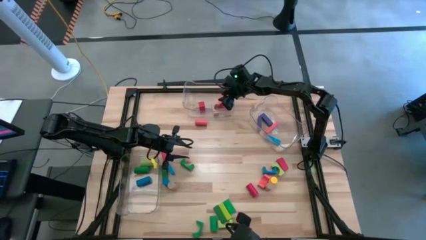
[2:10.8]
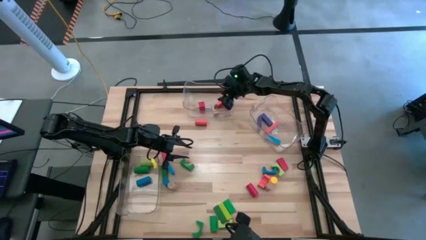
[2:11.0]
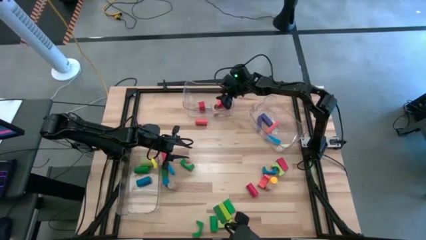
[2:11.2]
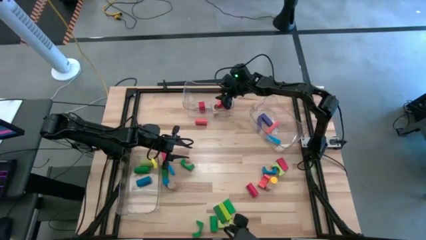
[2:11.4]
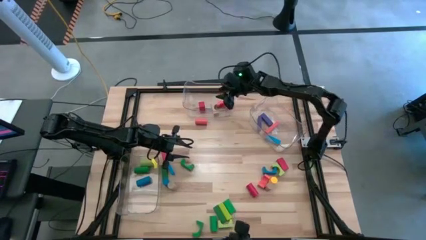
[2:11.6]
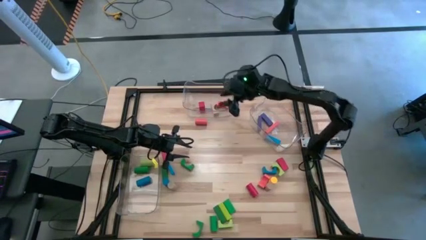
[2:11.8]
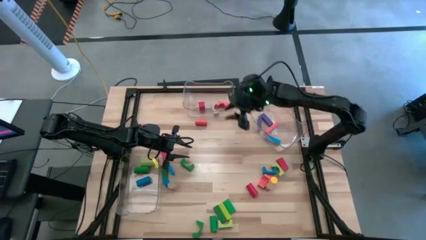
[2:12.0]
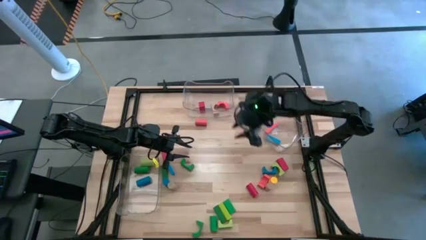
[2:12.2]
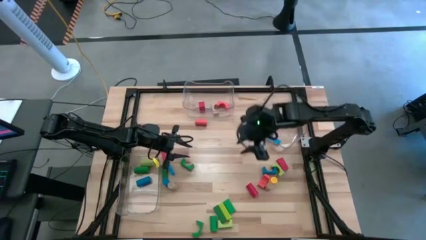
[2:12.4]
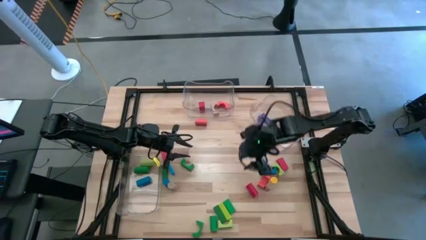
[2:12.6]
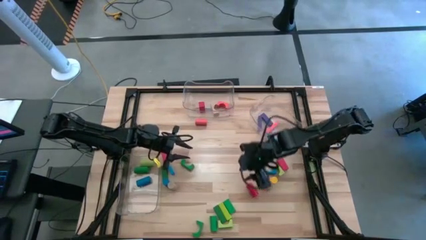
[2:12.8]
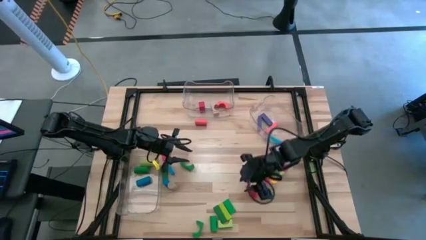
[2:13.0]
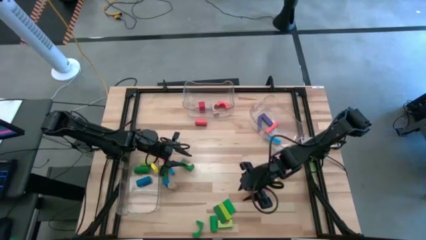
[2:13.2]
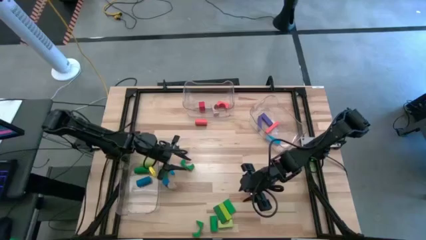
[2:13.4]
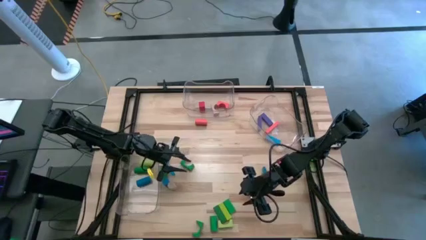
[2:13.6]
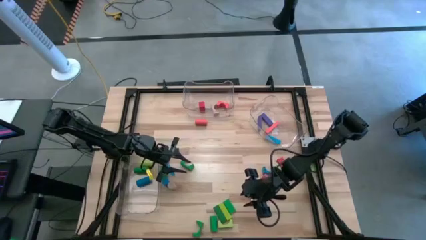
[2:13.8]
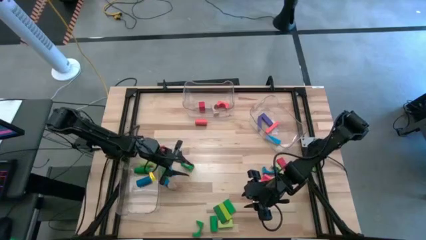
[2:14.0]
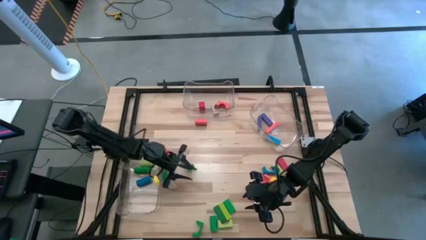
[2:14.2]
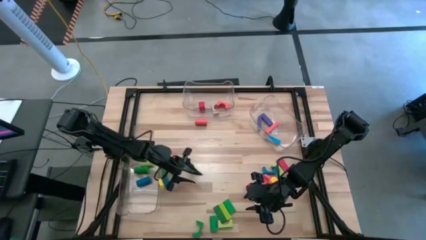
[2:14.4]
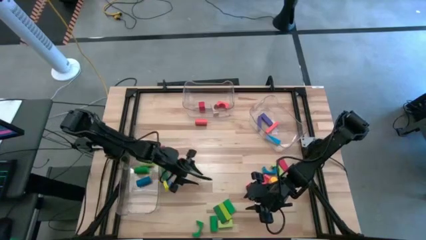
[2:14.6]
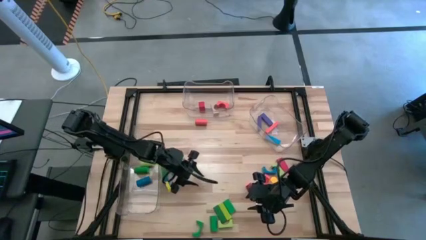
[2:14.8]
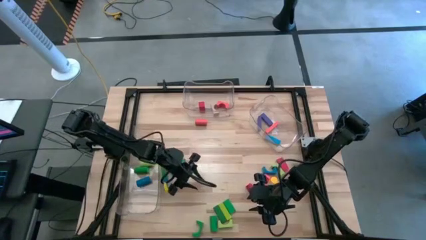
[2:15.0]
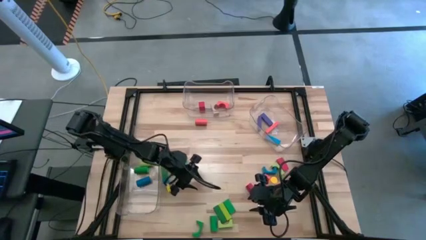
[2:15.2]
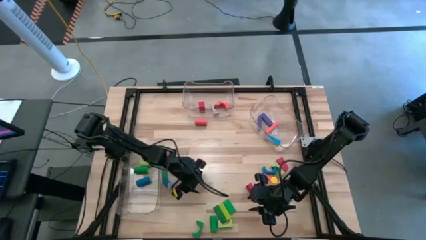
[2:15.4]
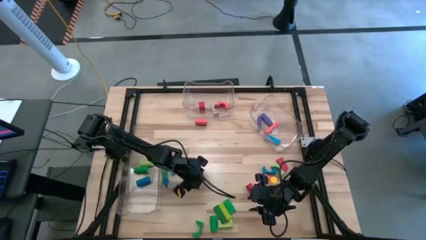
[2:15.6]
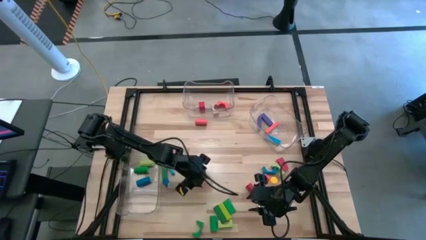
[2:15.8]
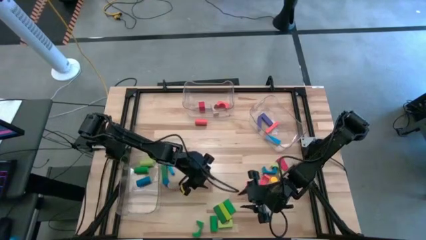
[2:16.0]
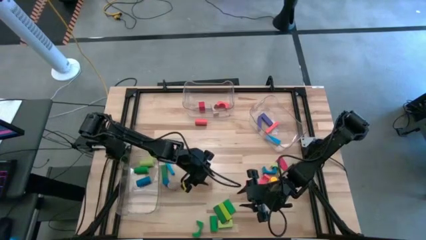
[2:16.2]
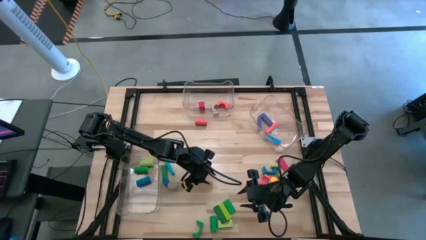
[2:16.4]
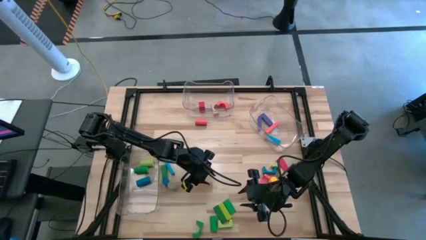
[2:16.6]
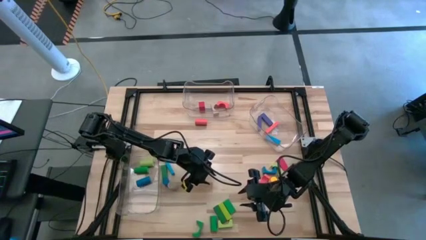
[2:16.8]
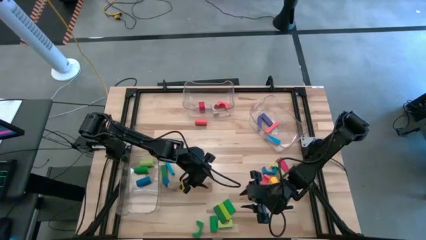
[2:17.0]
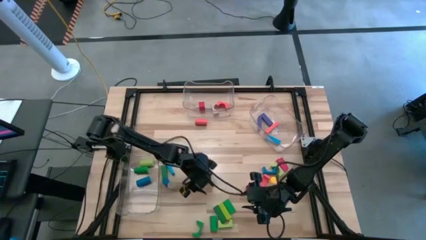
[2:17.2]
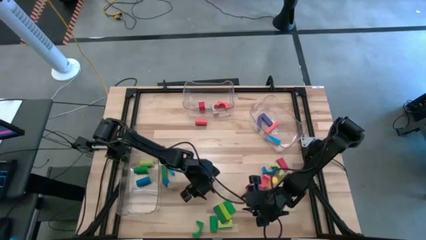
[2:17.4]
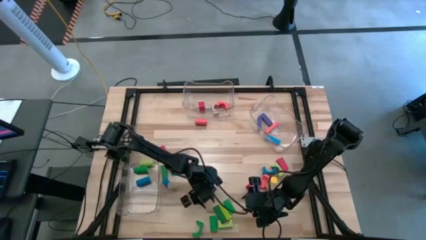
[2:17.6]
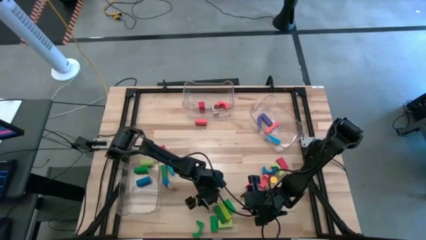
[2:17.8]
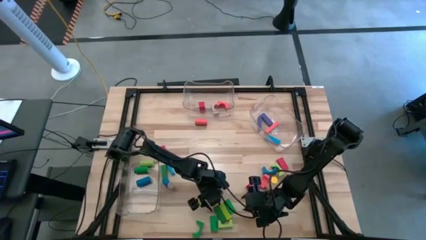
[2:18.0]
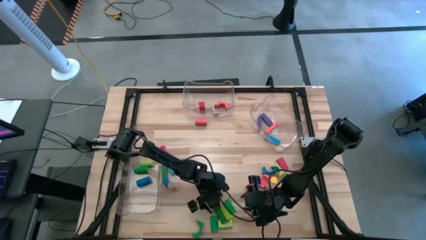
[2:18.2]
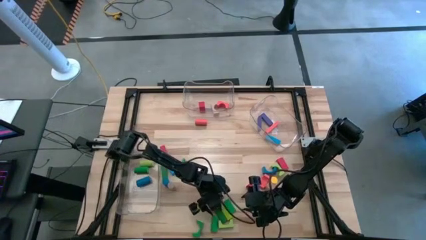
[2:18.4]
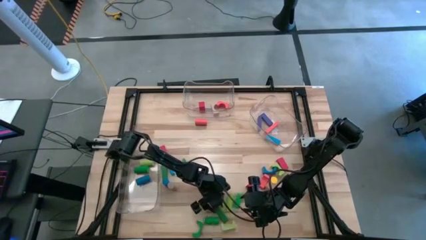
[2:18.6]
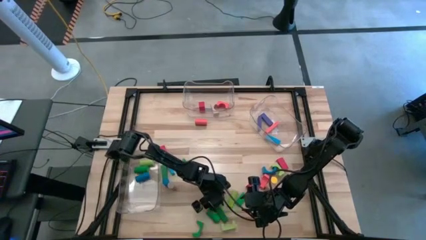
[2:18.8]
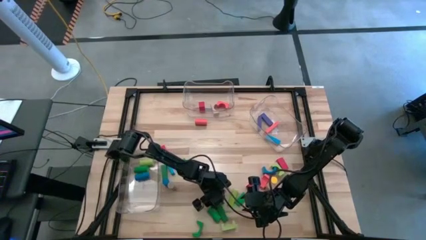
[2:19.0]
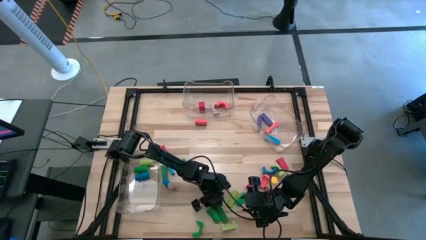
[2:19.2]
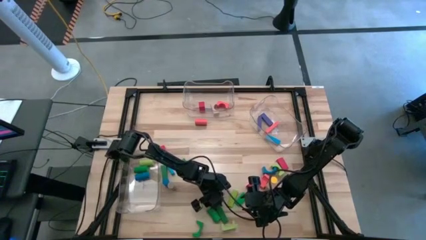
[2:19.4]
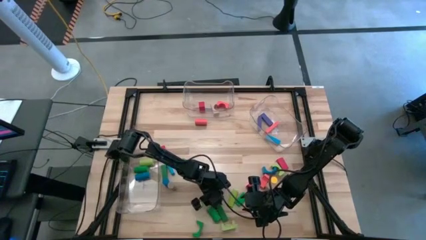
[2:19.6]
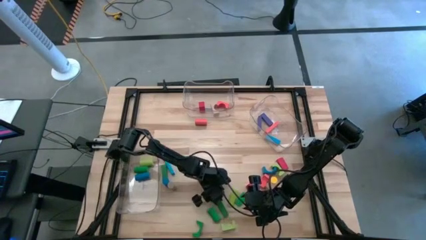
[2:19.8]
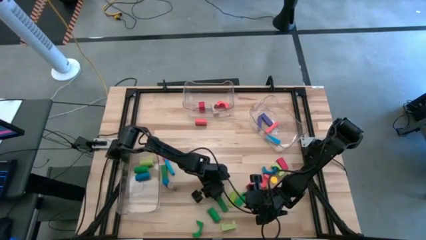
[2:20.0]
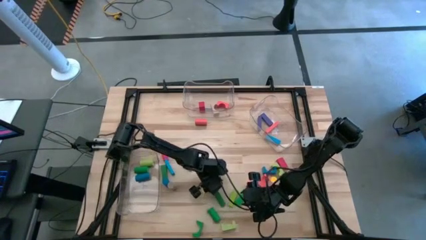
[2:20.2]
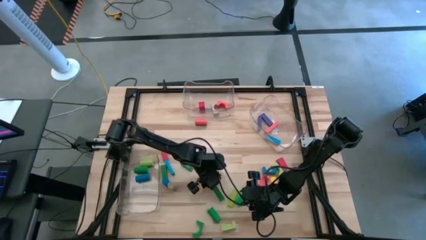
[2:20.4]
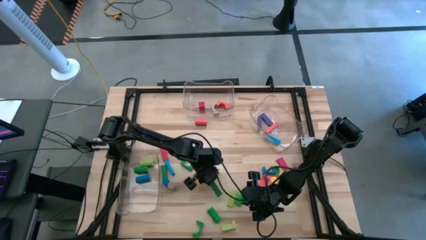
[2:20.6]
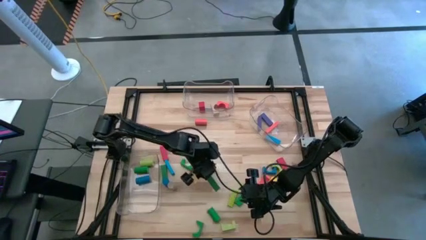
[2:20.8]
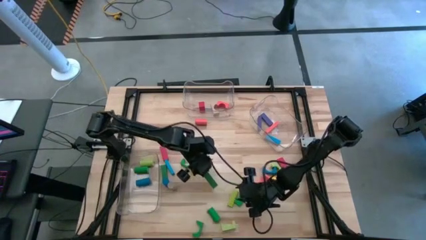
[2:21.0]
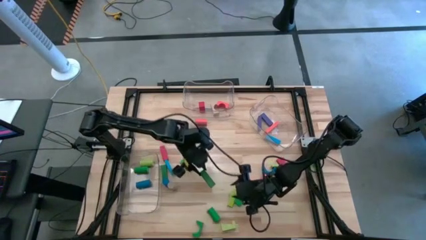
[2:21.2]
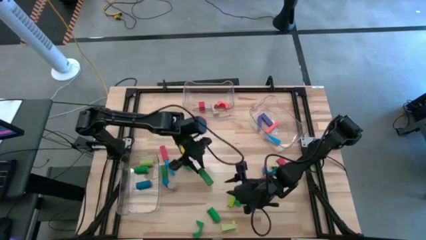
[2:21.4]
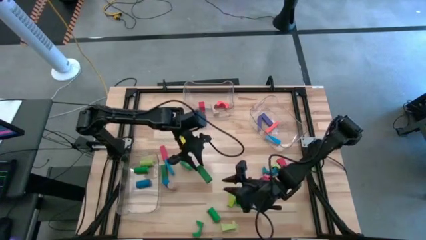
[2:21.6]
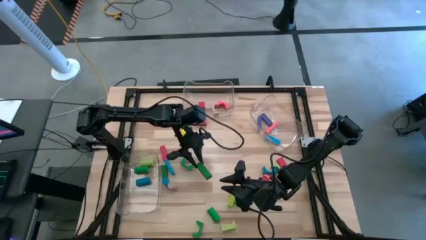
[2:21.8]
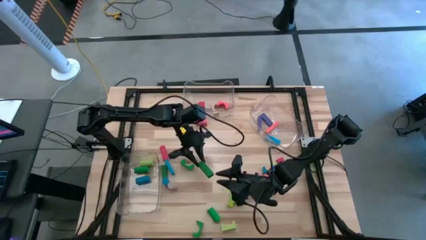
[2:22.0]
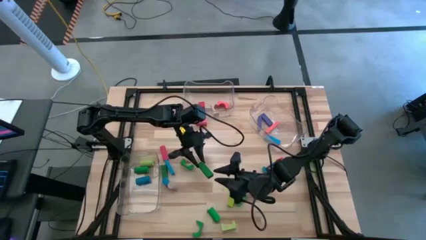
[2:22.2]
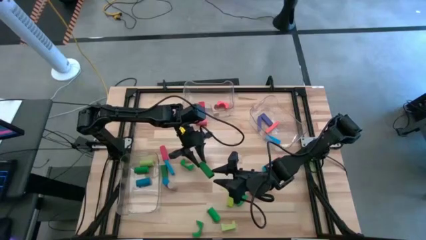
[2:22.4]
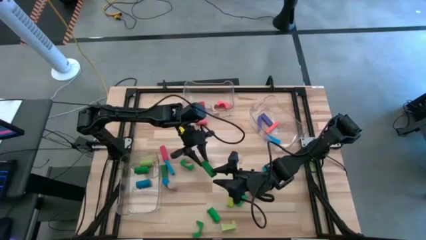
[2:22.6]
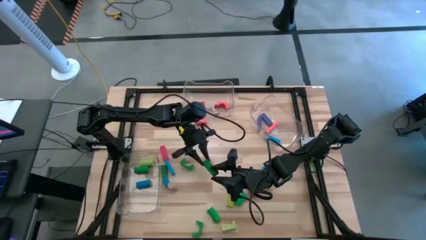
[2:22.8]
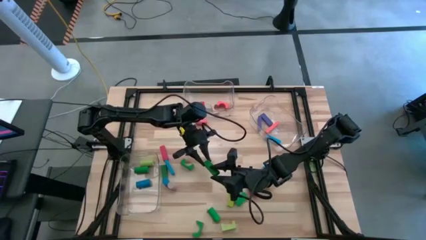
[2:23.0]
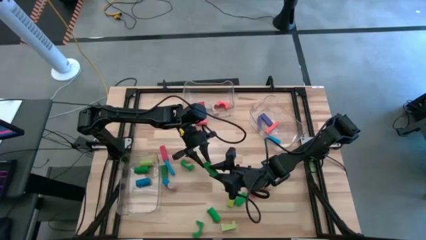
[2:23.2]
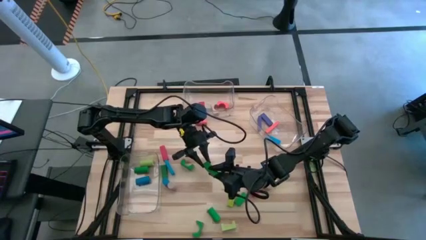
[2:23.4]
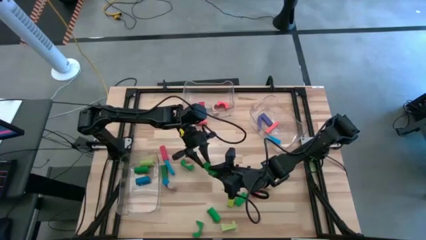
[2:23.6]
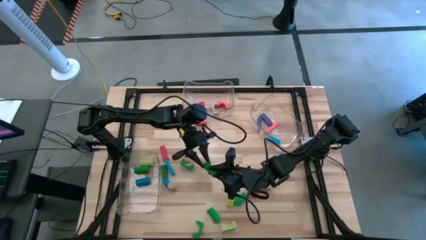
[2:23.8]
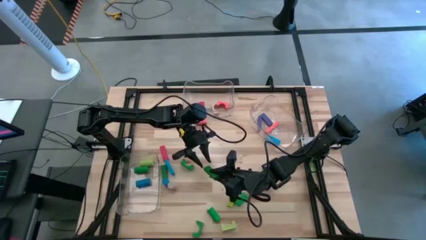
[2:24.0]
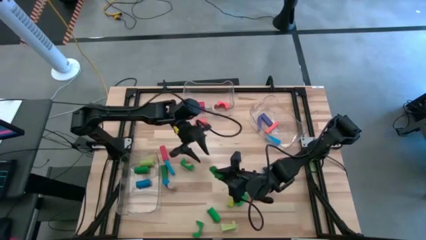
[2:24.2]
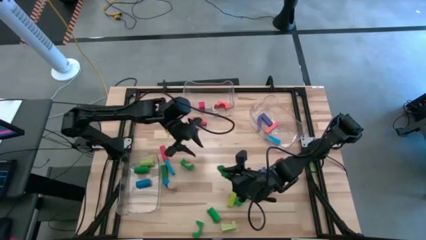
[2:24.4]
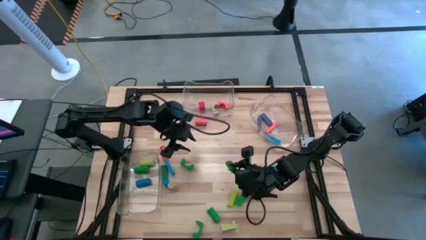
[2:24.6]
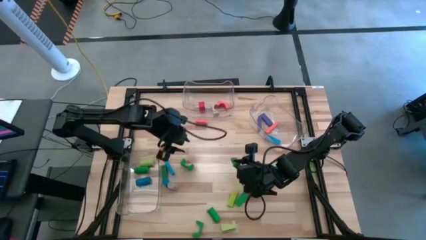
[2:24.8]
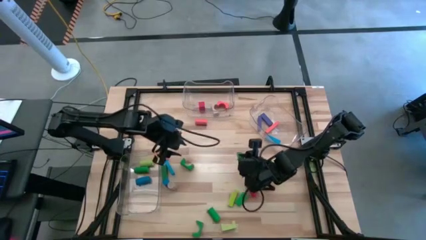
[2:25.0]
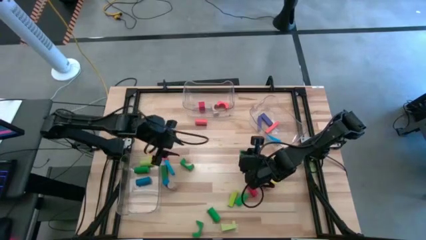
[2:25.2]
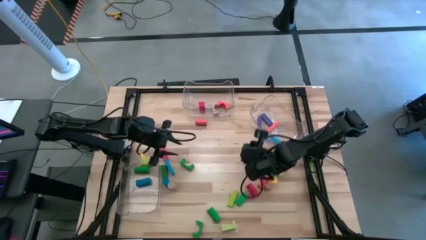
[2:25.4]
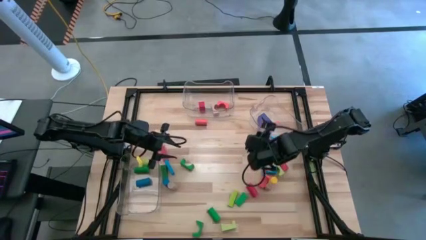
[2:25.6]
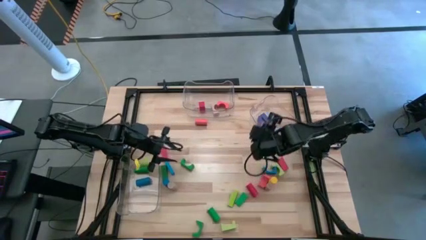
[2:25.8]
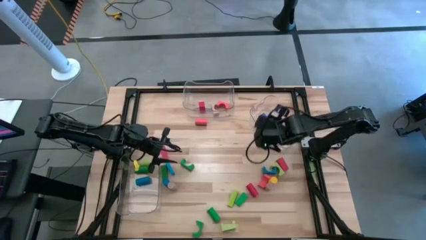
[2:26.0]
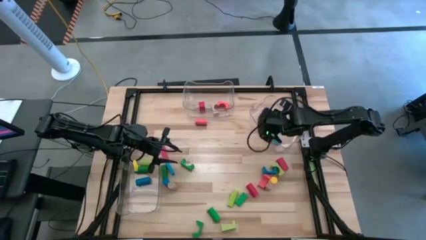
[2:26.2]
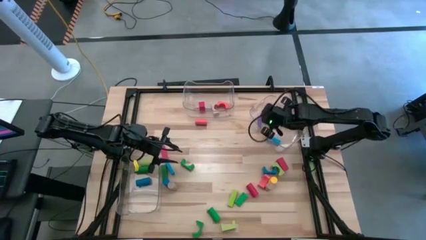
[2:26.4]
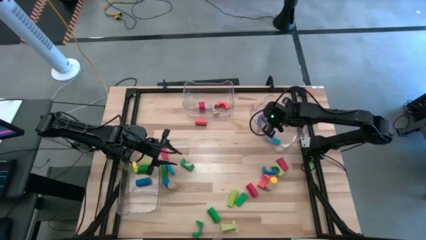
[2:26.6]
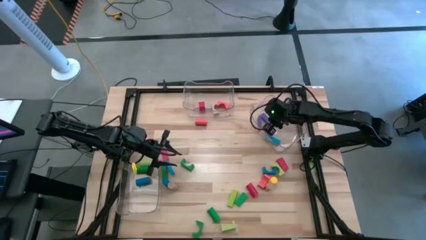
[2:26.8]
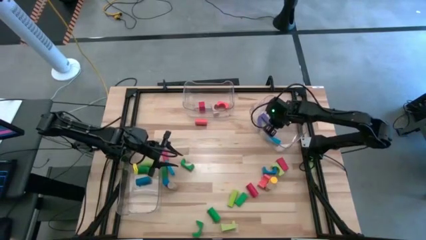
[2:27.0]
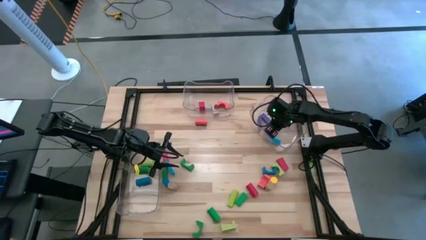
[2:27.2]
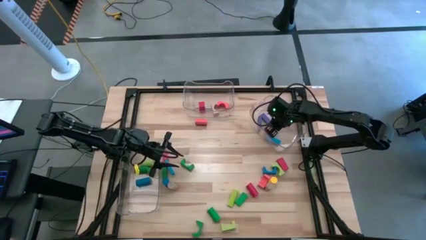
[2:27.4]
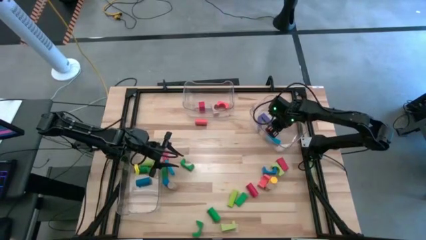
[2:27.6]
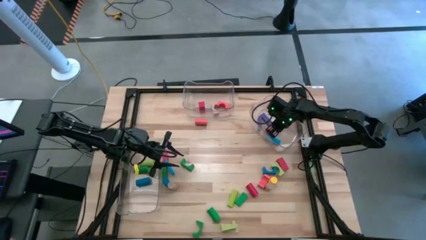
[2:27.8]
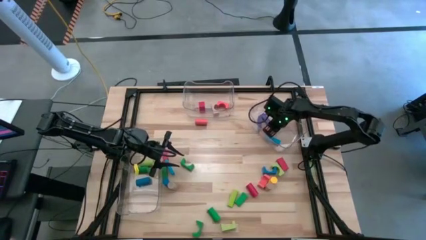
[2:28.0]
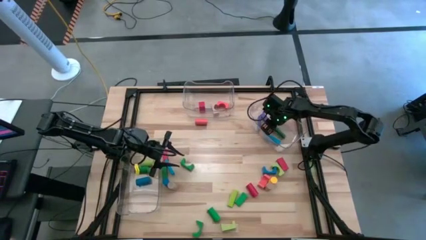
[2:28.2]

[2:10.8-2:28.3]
Task: Sort blocks by size
Put the green rectangular block into the right transparent bin
